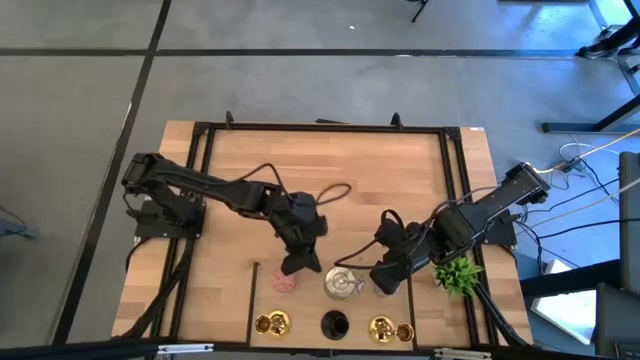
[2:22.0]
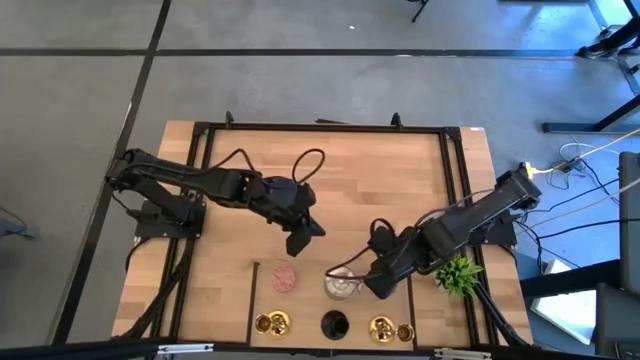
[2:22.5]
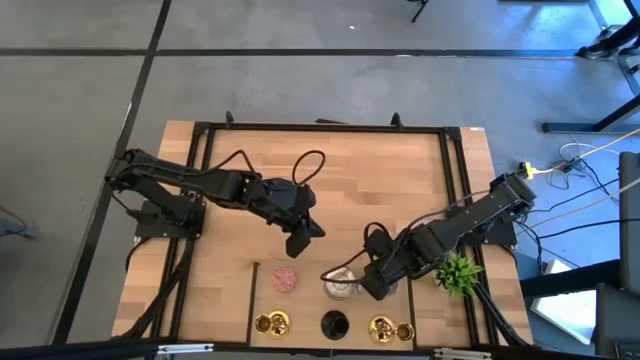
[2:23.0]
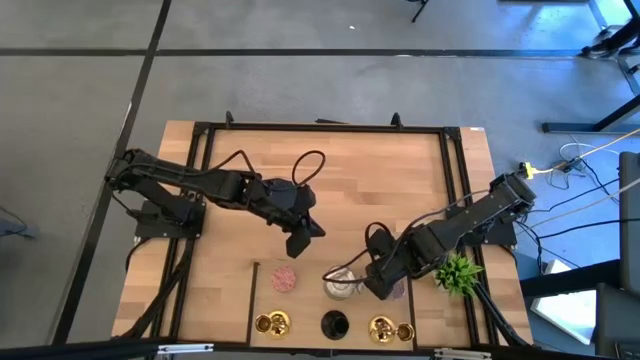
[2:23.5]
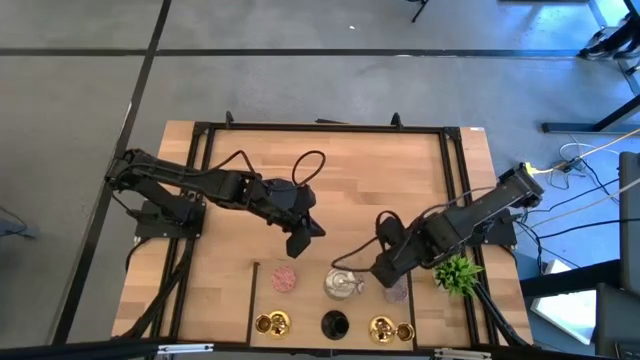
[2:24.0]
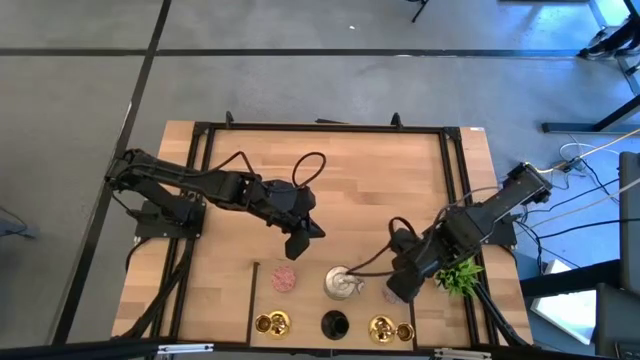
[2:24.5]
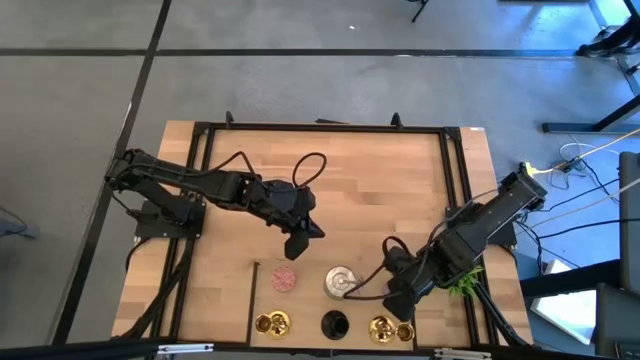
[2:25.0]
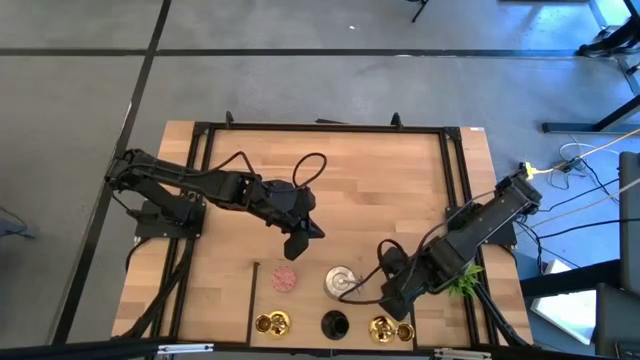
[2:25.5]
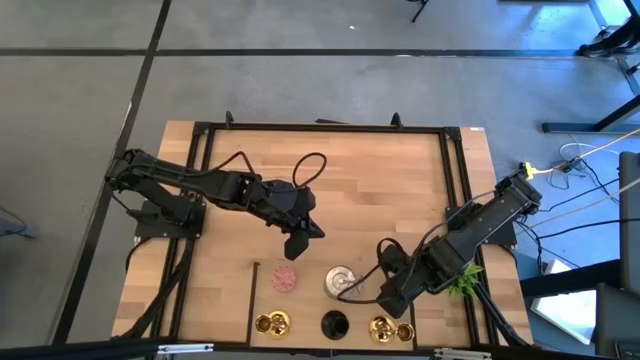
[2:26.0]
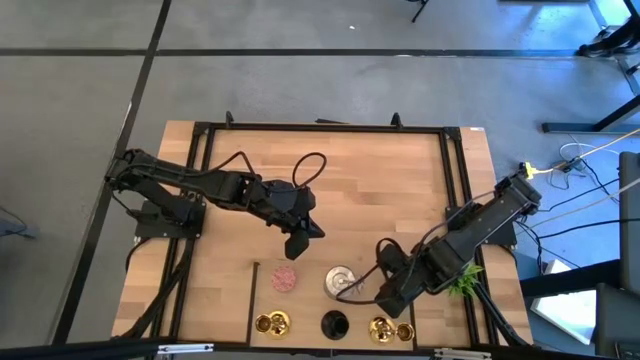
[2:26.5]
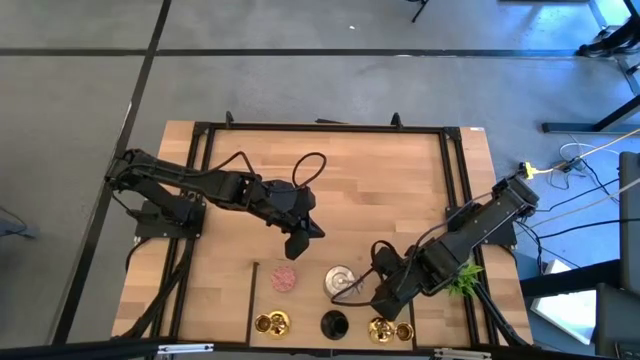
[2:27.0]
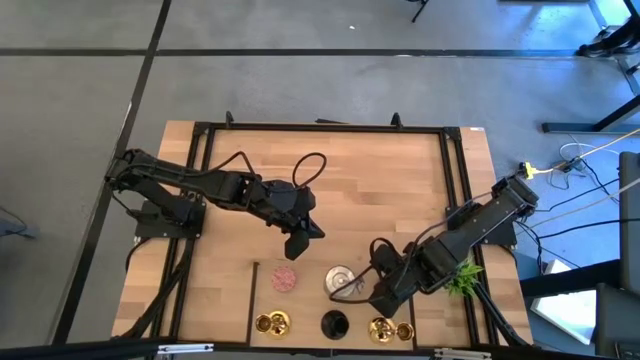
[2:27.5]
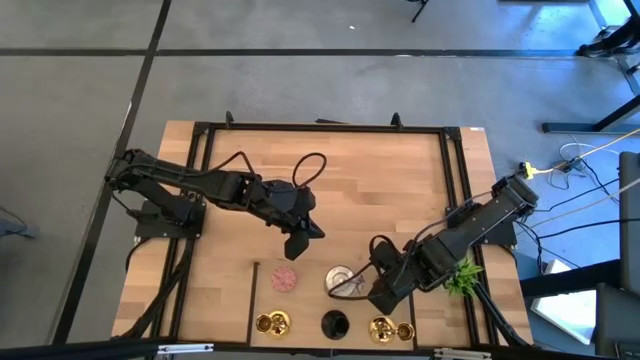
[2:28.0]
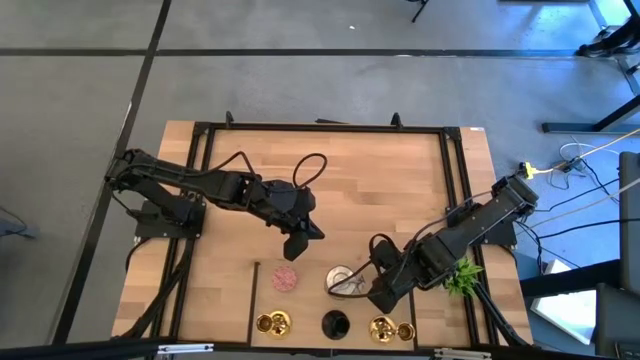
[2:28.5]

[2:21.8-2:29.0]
Task: Pick & Place candle stick holders
Adjust the red scented candle on the shelf

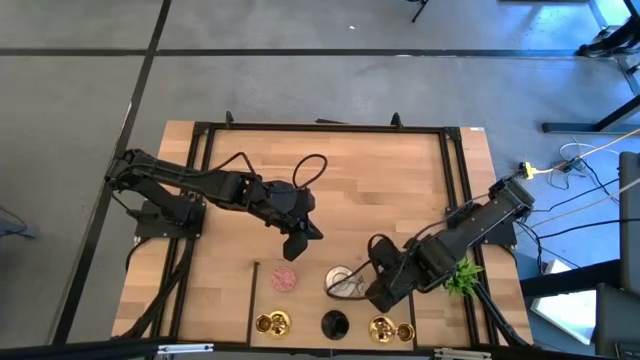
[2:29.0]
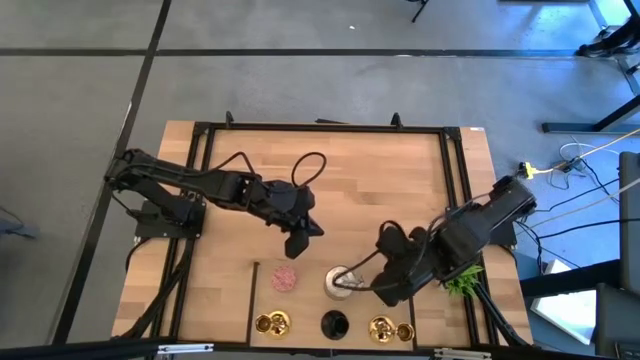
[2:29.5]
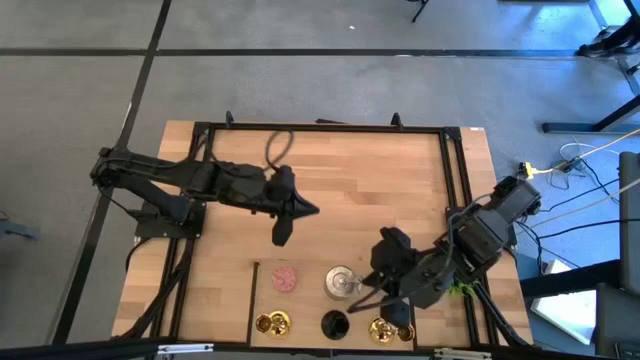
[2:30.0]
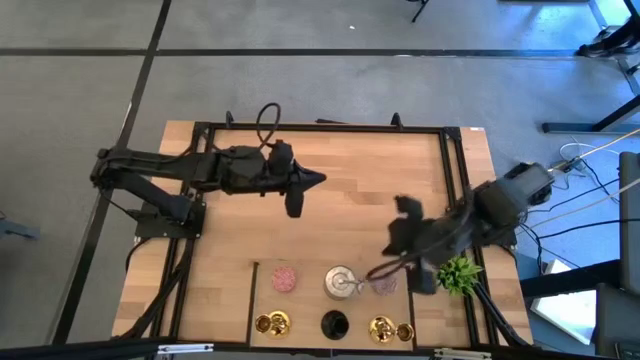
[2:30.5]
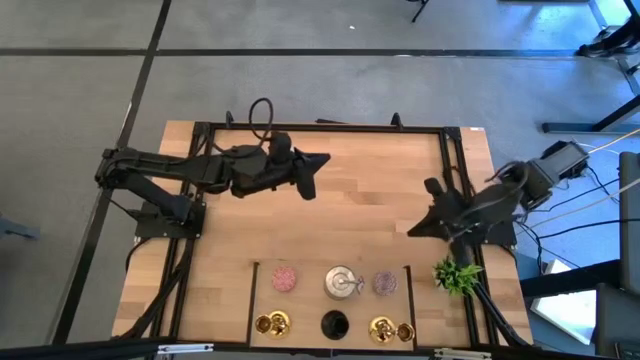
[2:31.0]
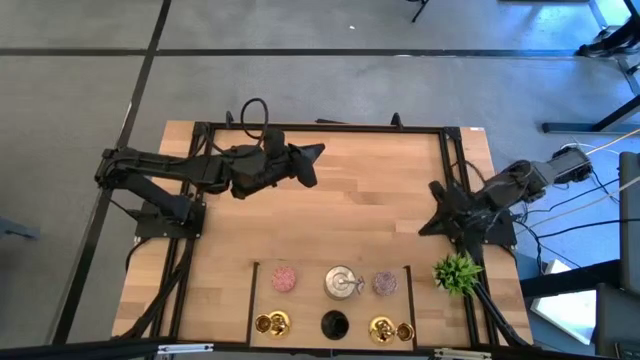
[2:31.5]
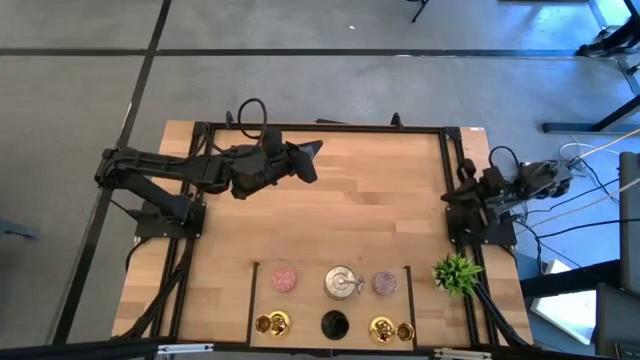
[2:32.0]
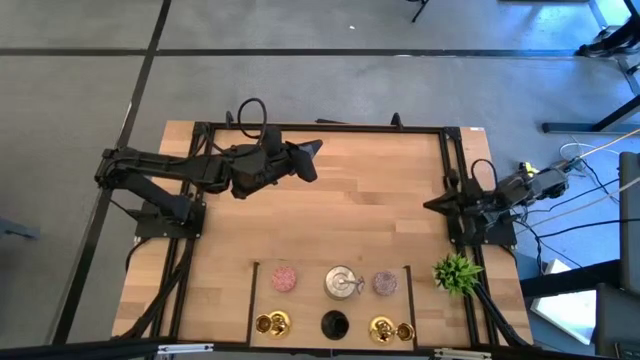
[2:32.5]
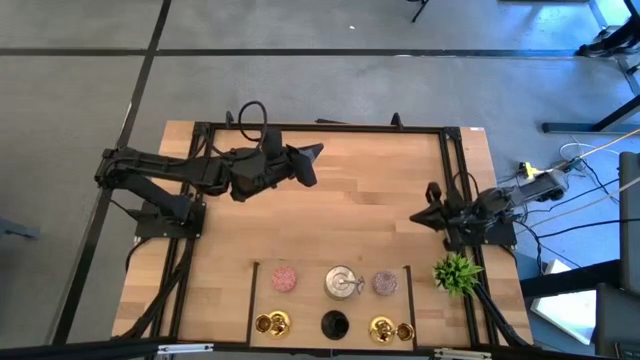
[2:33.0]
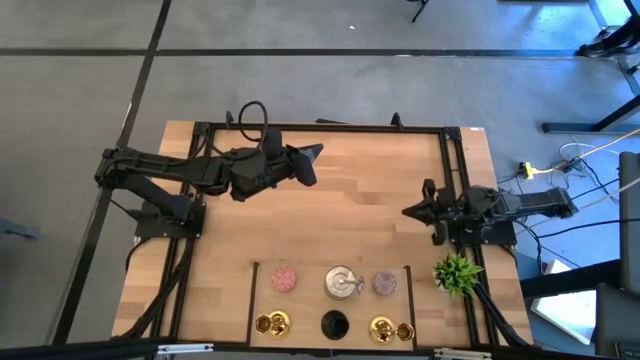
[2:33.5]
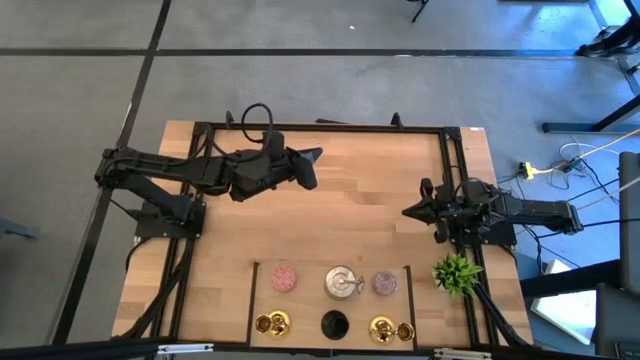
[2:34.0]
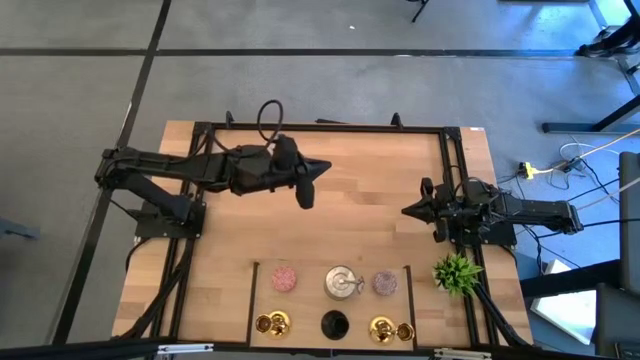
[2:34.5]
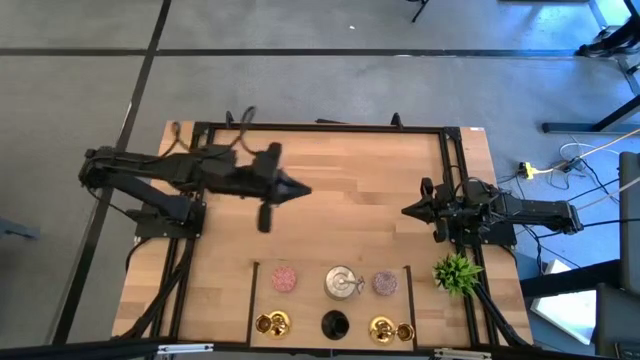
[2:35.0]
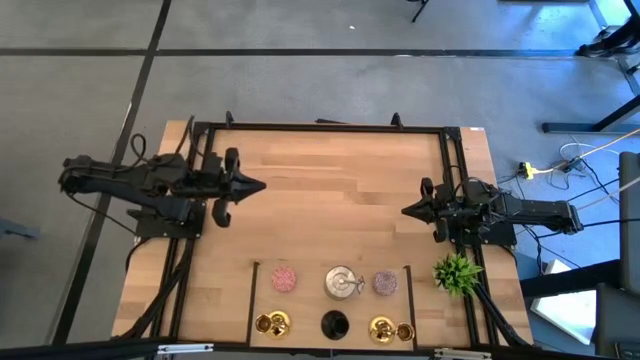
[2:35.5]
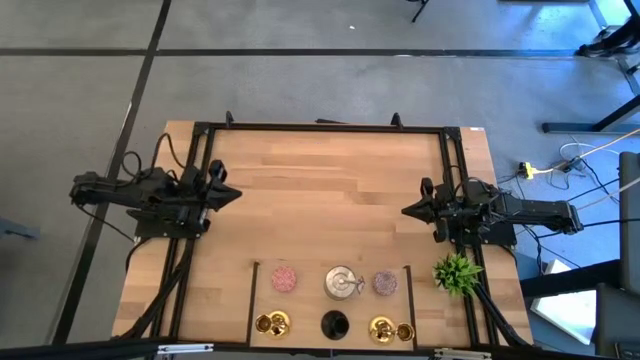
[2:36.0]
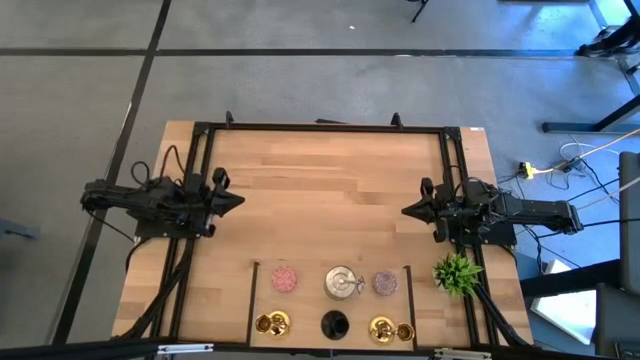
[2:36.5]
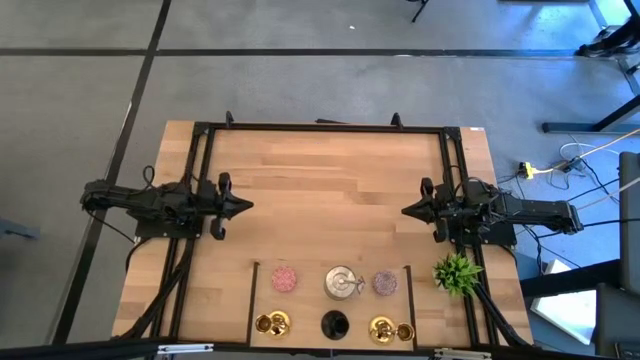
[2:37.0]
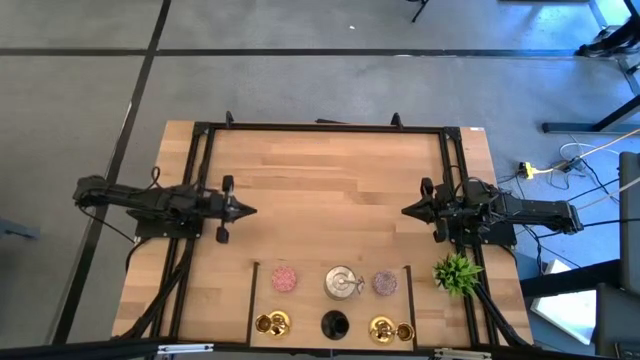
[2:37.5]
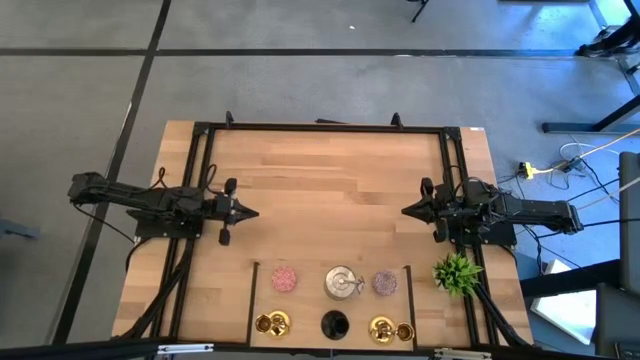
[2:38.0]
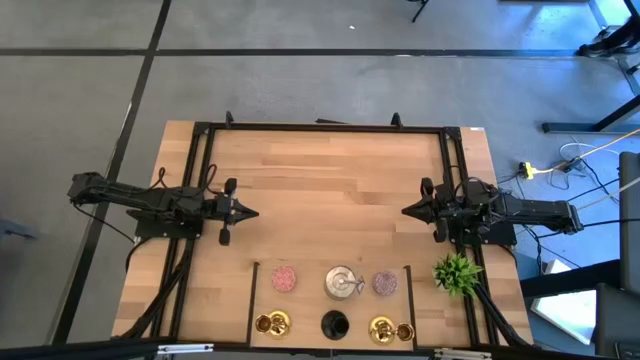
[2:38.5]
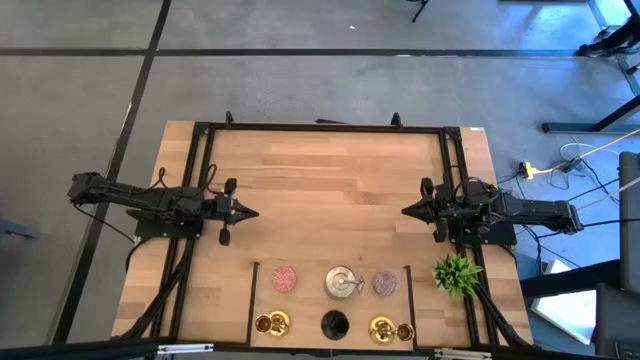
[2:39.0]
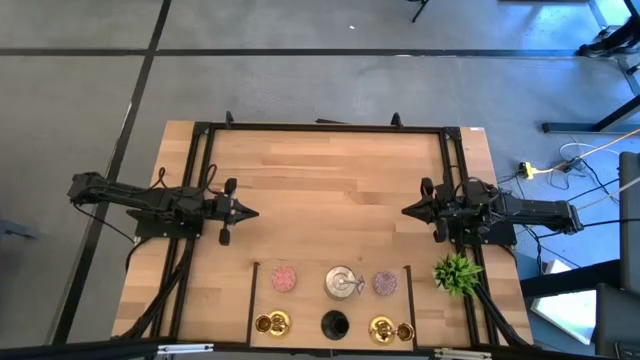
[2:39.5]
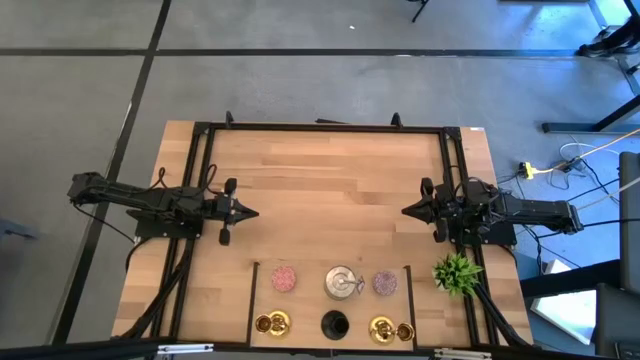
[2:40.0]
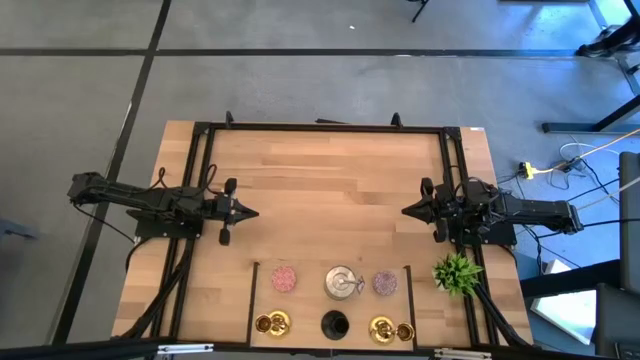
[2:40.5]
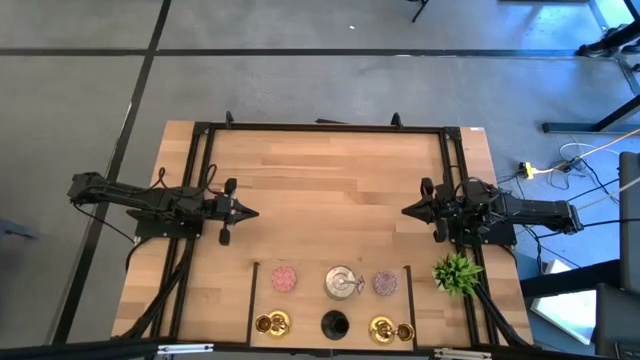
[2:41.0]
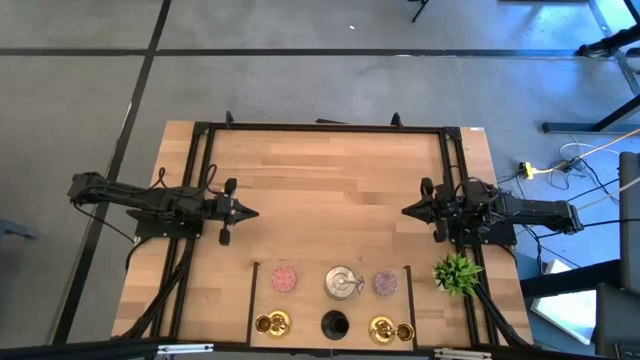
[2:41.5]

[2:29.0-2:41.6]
Return to Home Position

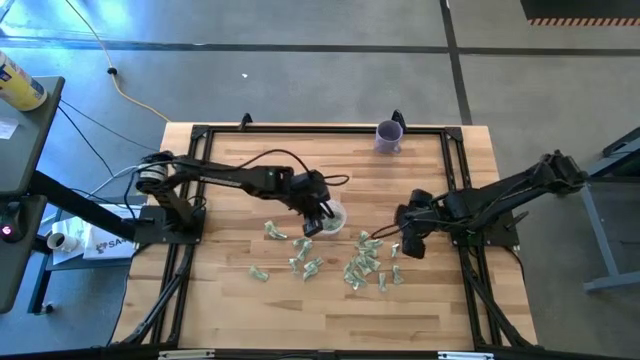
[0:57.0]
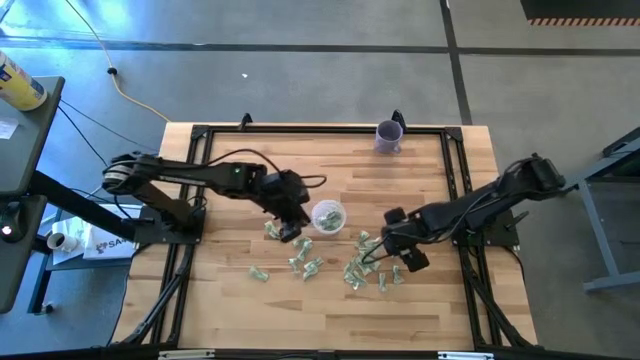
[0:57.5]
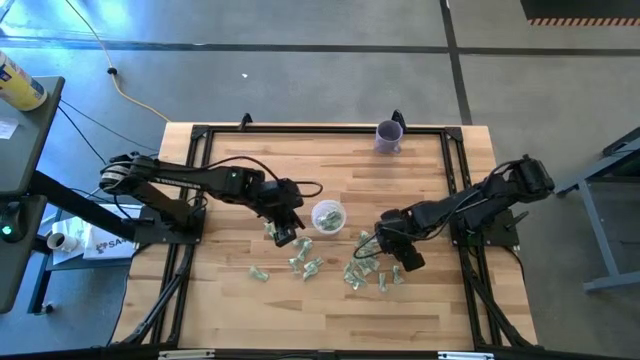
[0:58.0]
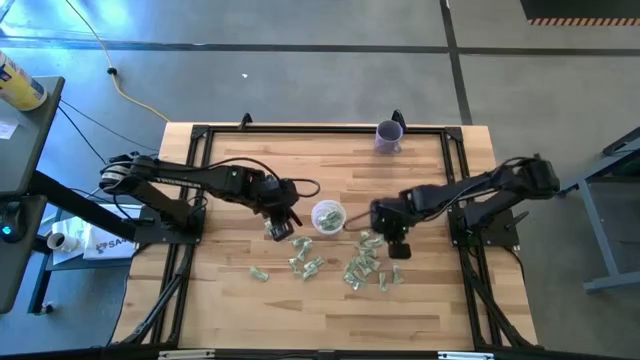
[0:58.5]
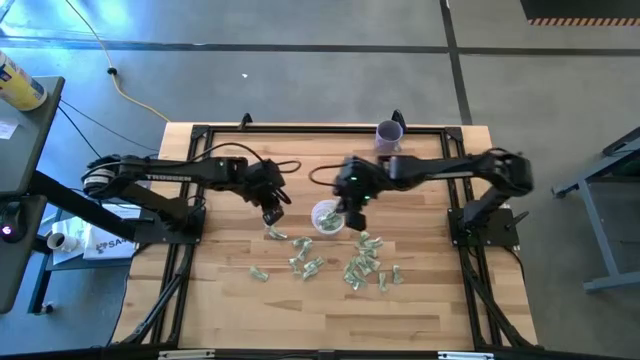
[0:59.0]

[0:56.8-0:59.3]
Task: Pick and place Stevia / Truvia into bins
Put the green stevia packet into the transparent bin

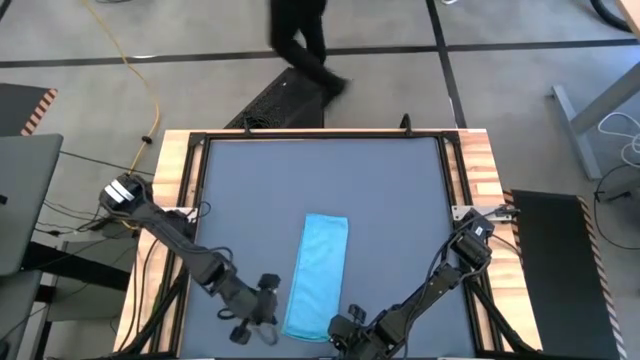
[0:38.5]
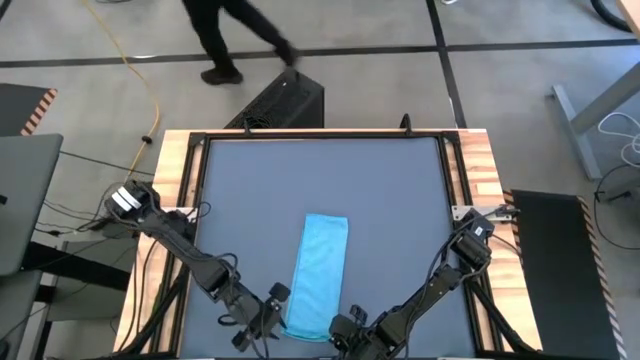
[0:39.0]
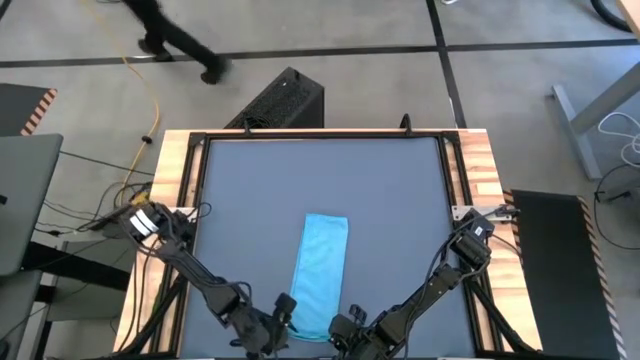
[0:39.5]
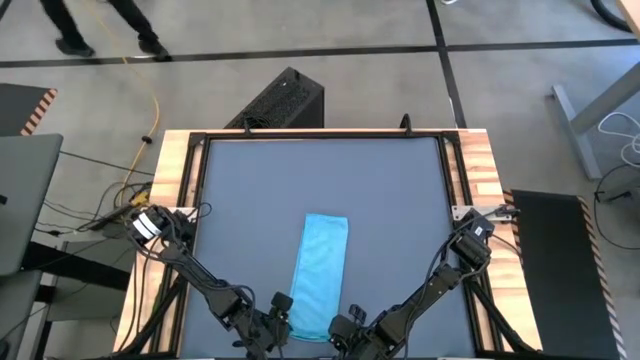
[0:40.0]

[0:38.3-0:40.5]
Task: Roll towel
Roll the blue towel
